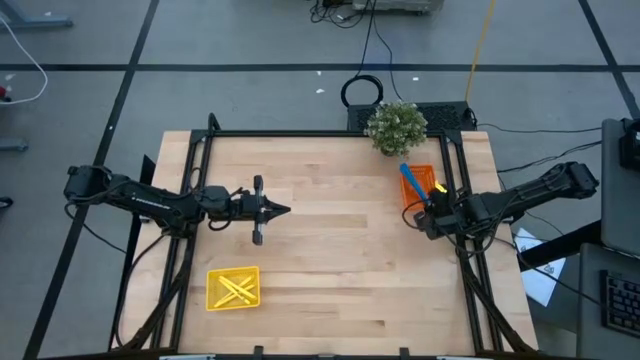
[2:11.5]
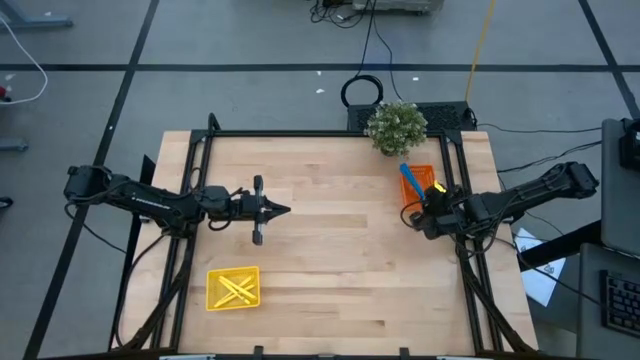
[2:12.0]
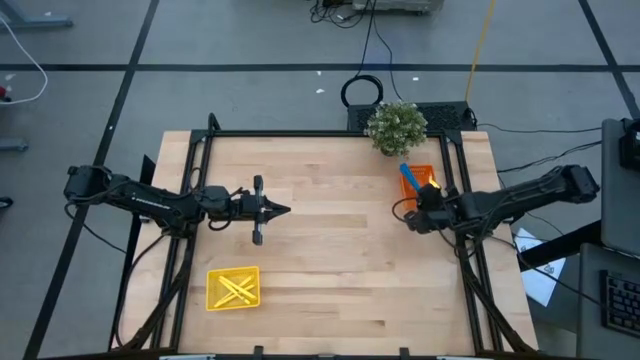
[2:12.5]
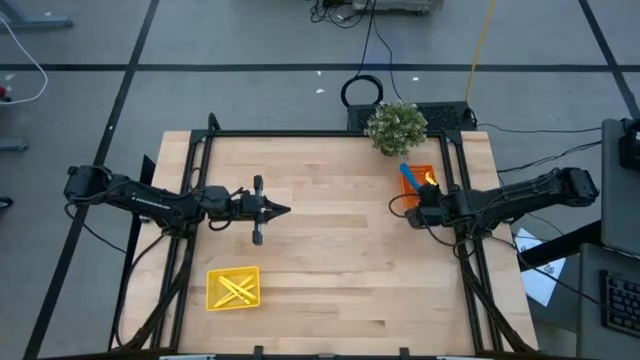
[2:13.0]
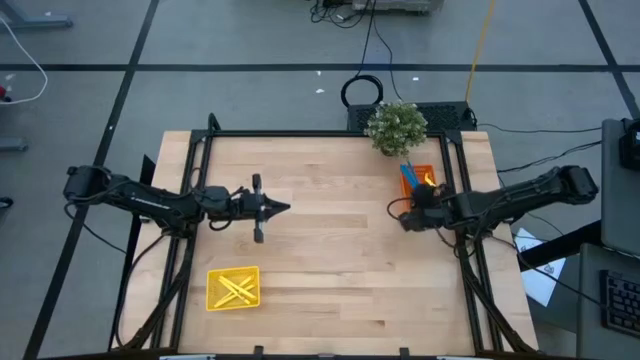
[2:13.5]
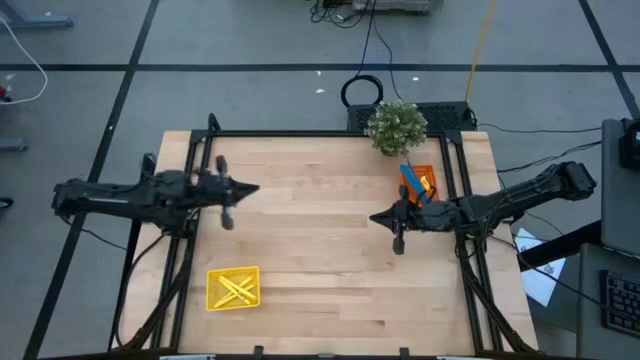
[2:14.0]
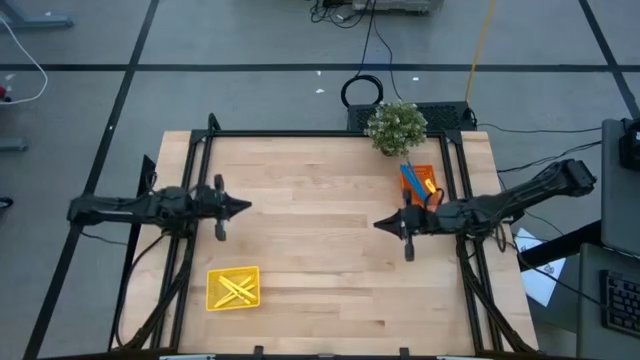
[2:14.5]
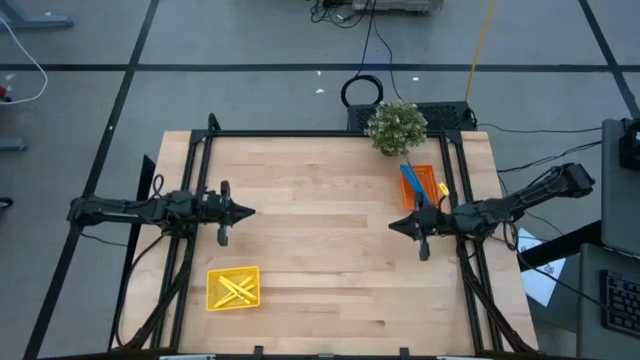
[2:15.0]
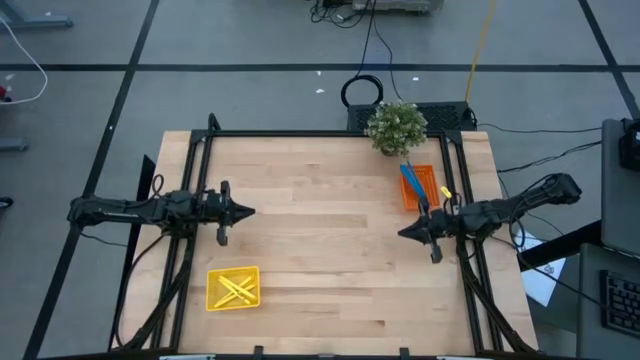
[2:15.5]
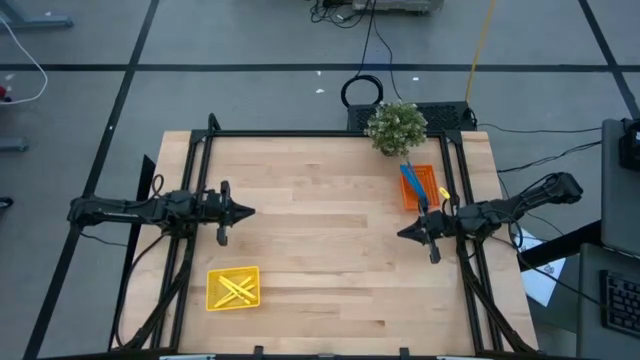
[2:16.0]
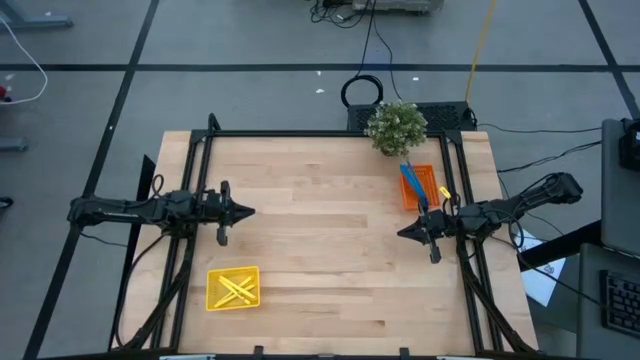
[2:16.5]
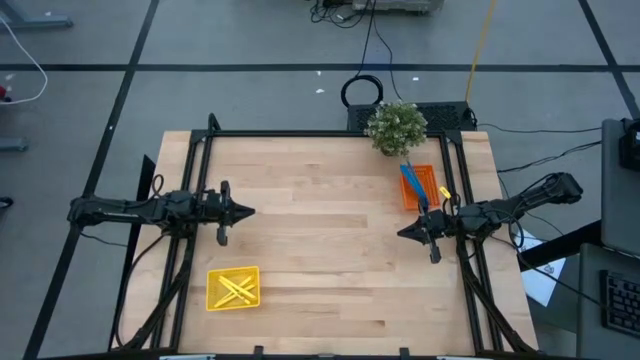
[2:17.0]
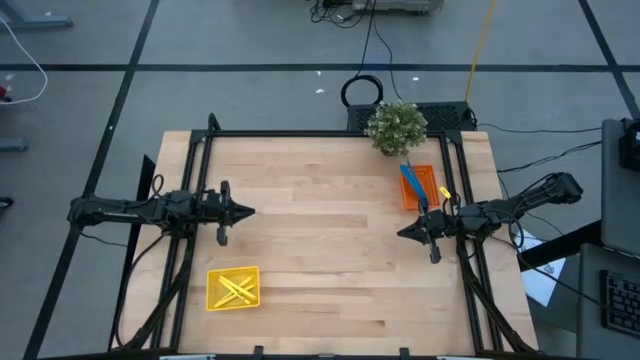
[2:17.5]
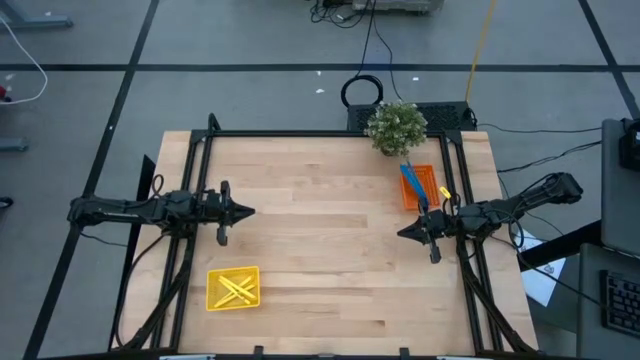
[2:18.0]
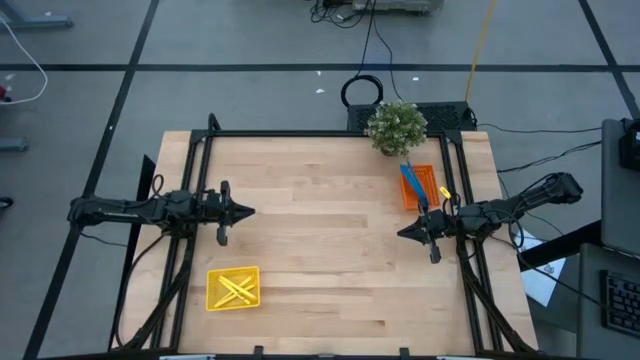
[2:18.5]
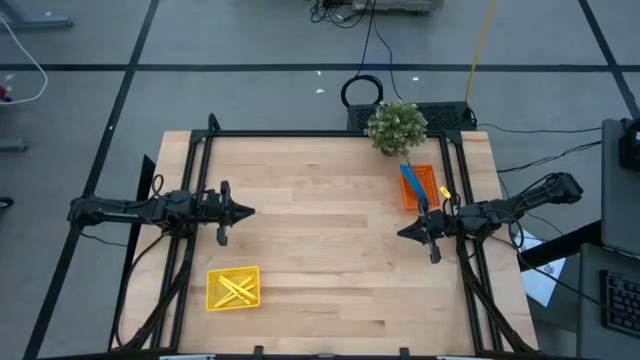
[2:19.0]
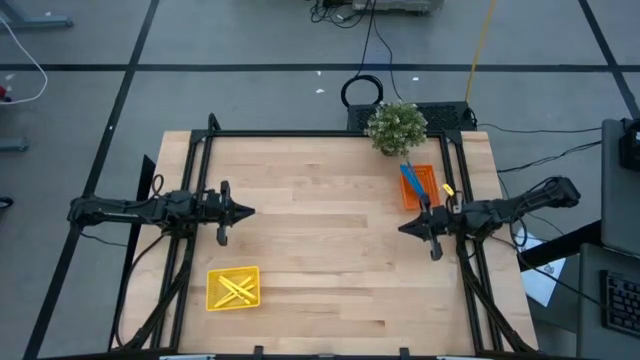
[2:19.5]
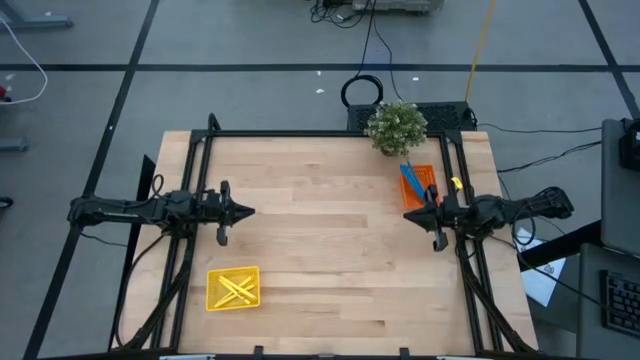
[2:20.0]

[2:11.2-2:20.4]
Task: Sort pens & pencils
Return to Home Position

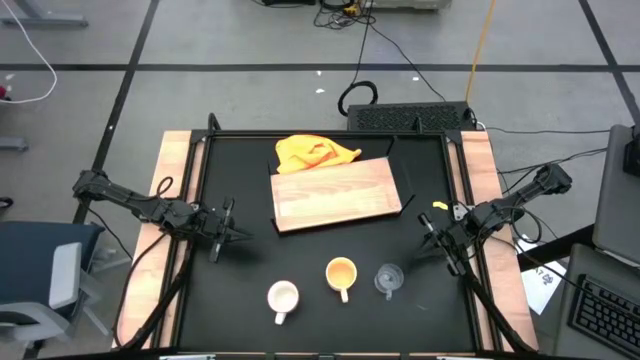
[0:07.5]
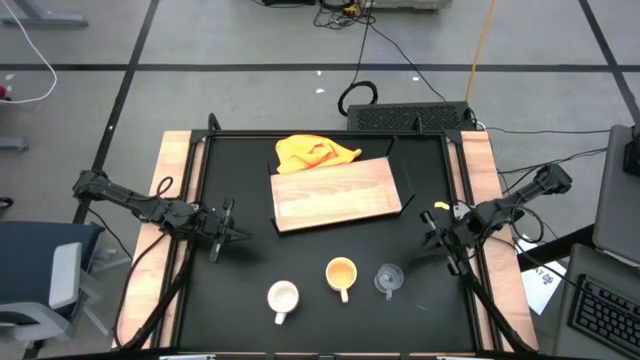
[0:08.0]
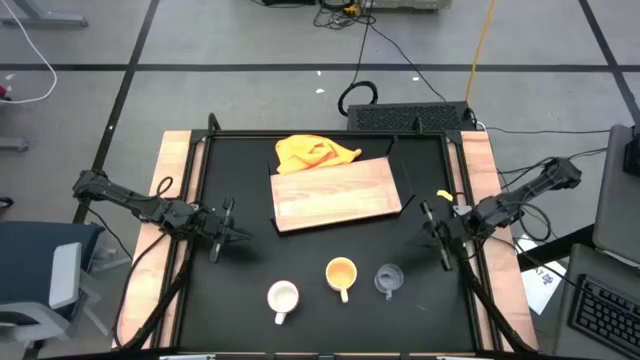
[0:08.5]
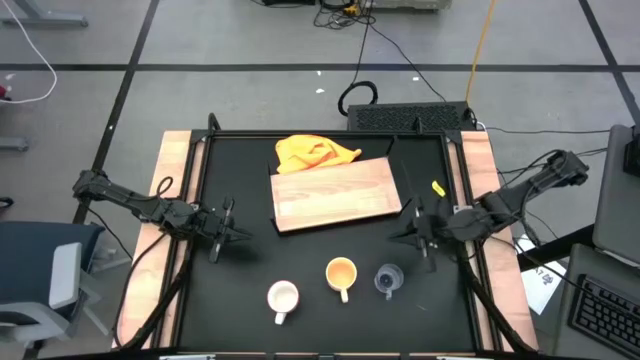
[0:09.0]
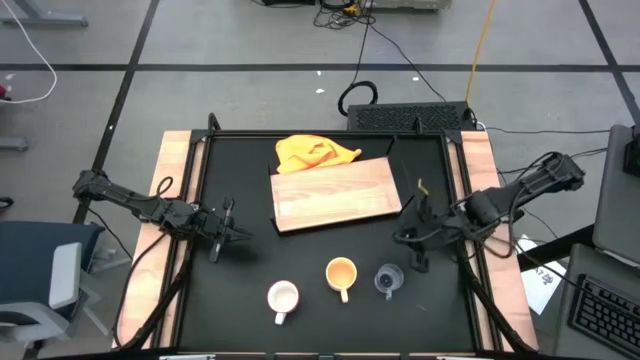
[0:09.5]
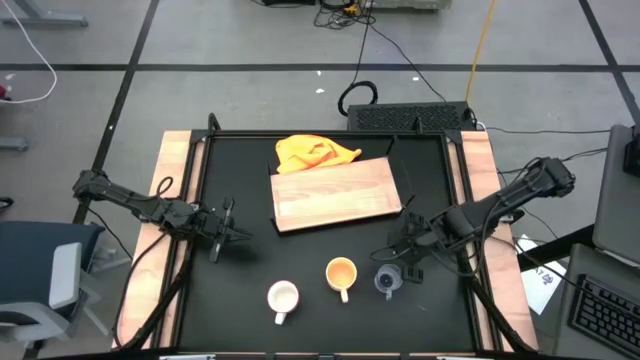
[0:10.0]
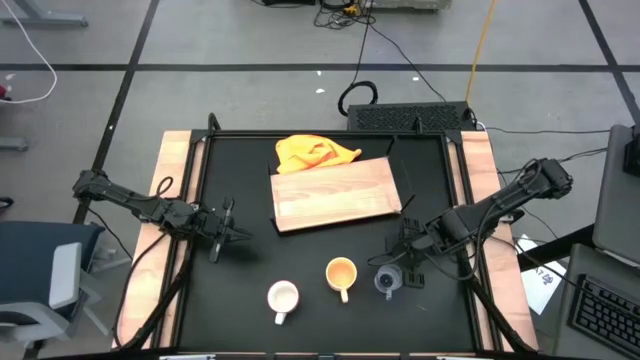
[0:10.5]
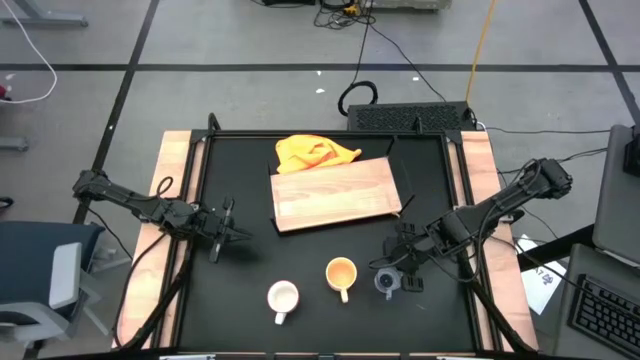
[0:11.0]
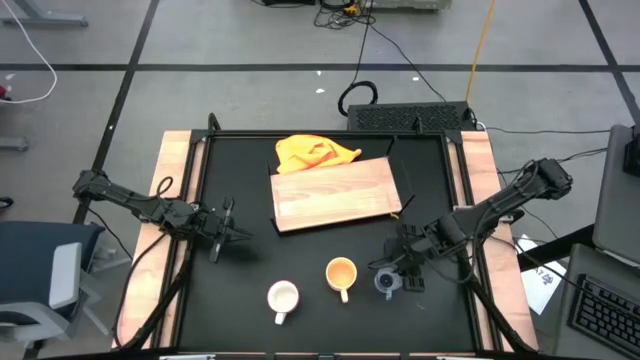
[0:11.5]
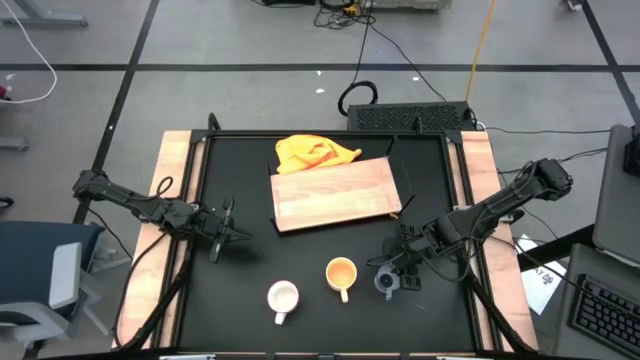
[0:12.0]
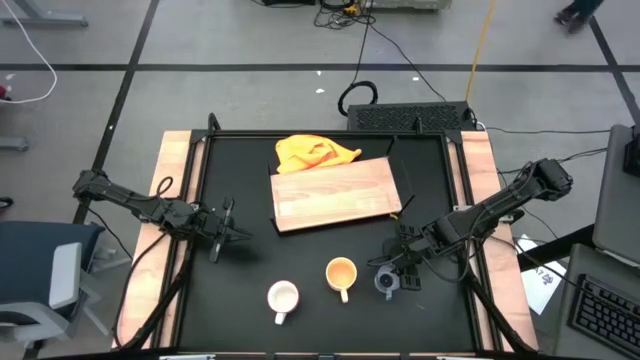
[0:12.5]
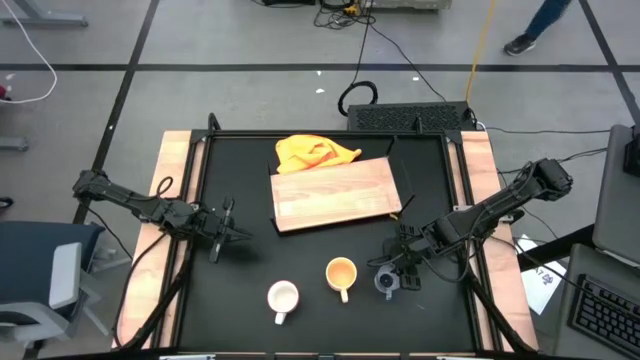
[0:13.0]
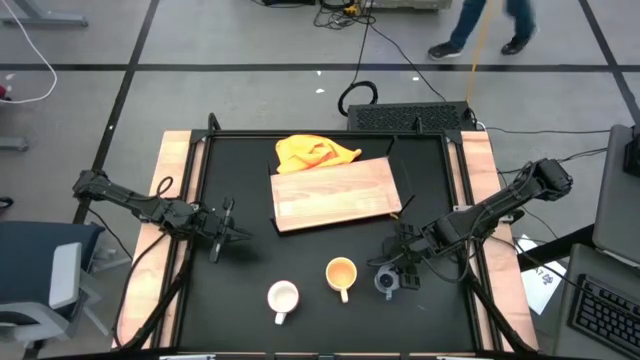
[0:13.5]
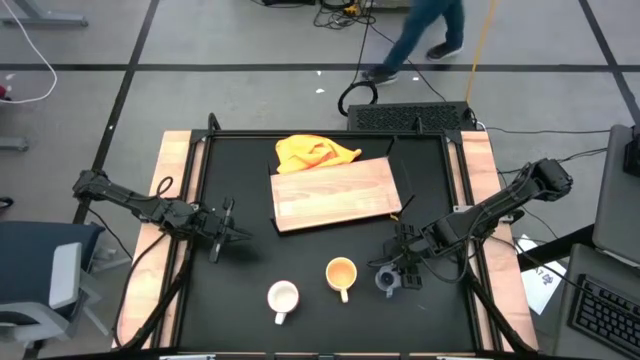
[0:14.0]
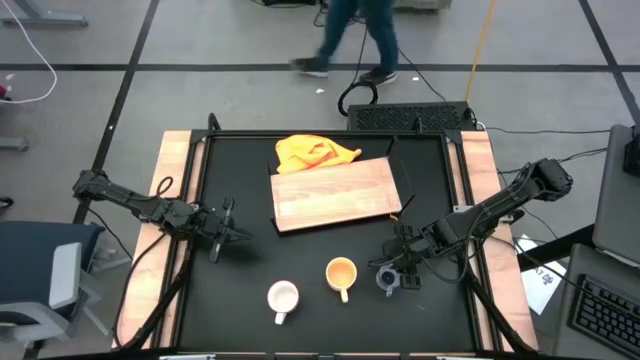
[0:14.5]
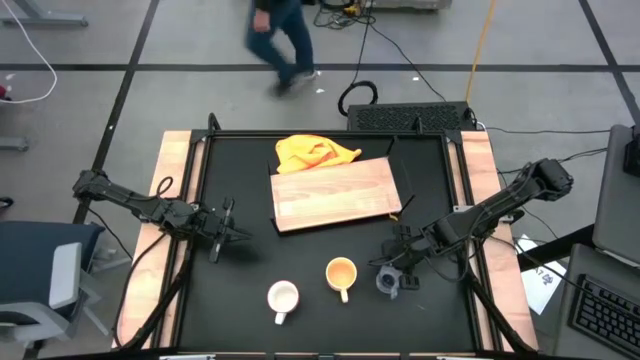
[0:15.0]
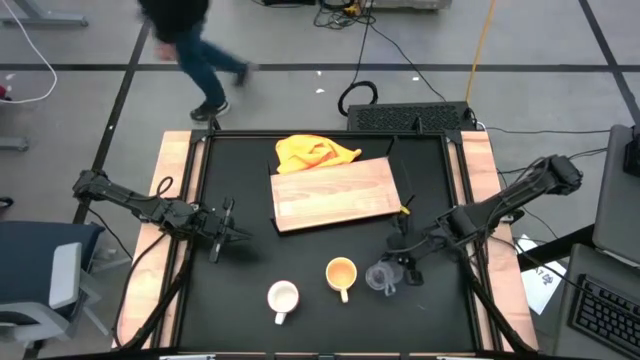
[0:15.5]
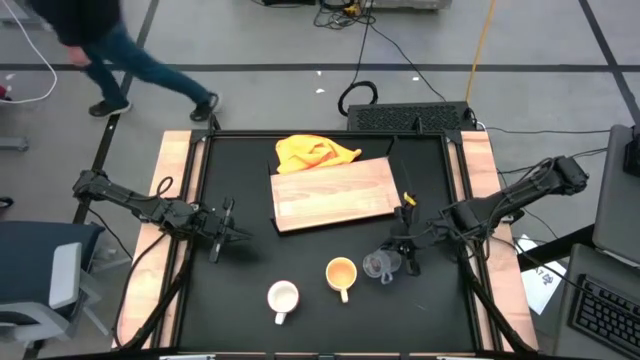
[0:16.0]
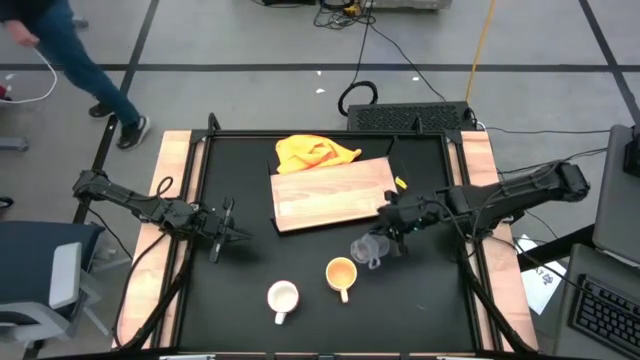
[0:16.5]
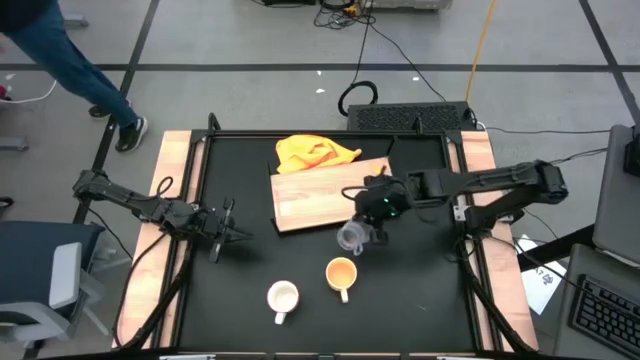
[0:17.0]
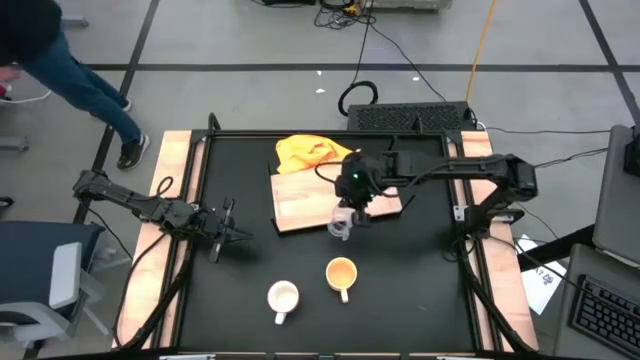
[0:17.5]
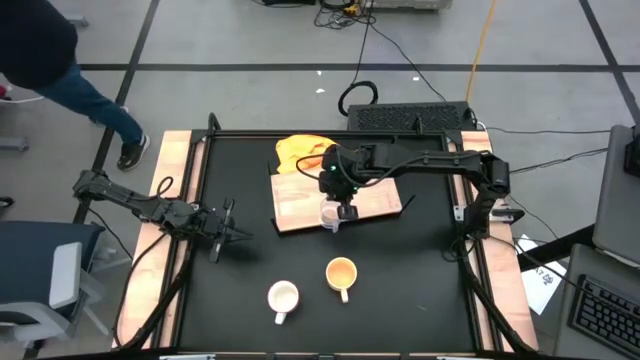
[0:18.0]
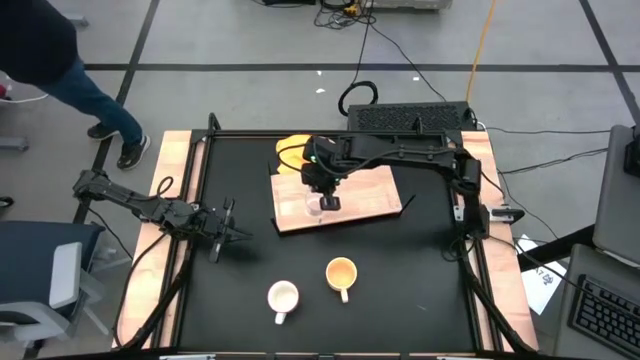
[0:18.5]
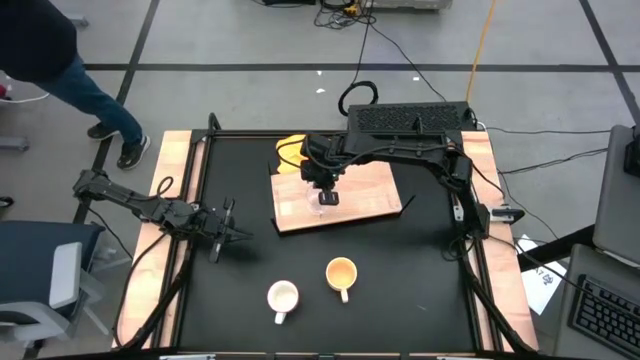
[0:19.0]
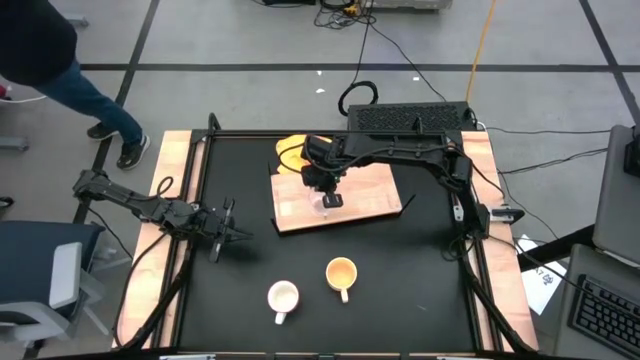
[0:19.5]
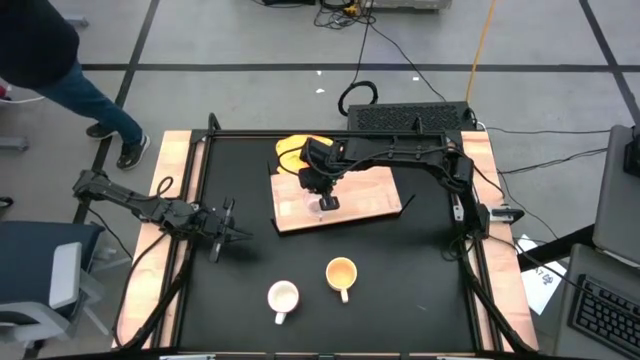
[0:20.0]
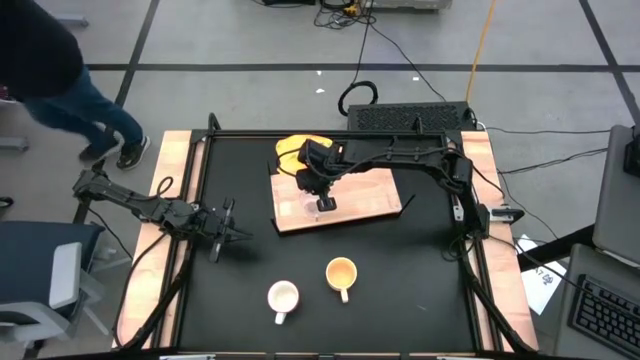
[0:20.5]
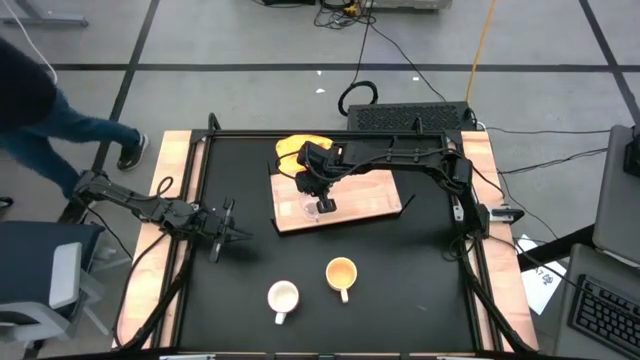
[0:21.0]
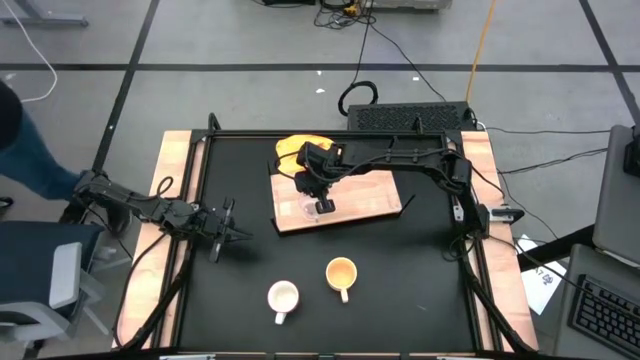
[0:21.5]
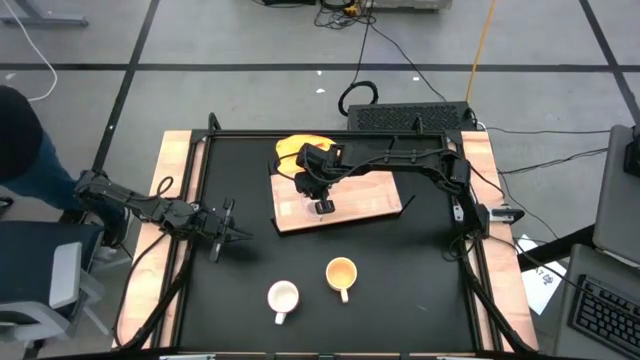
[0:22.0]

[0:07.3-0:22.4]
Task: Stack small to large cups/mugs on shelf
Put the transparent mug on the shelf
